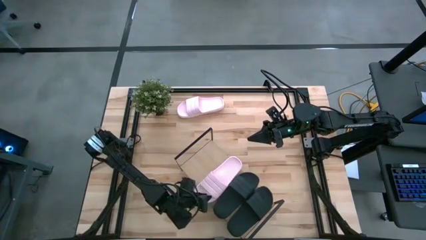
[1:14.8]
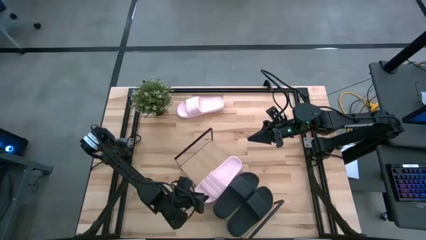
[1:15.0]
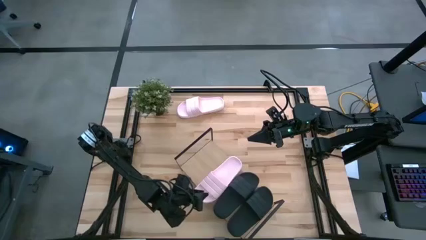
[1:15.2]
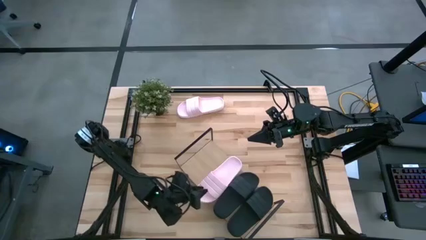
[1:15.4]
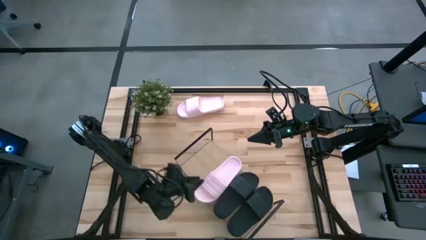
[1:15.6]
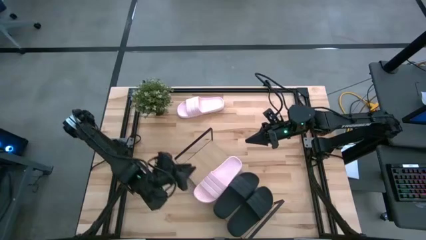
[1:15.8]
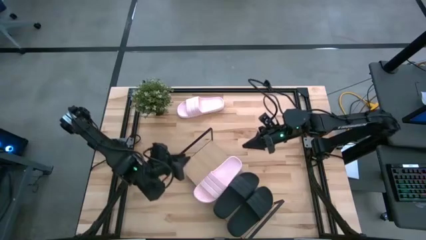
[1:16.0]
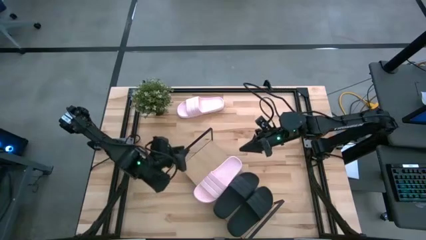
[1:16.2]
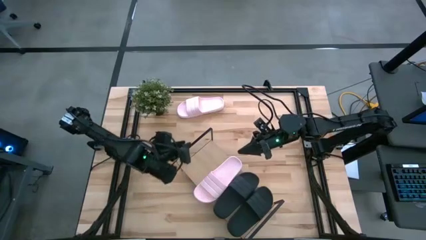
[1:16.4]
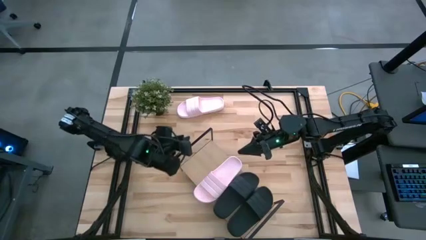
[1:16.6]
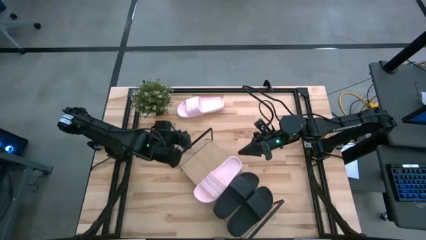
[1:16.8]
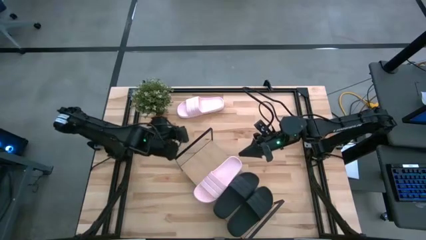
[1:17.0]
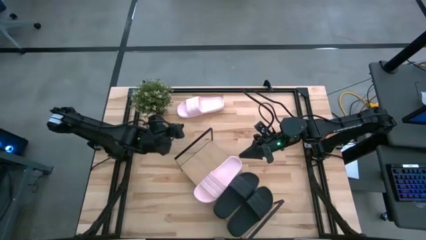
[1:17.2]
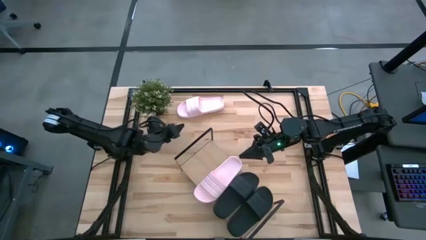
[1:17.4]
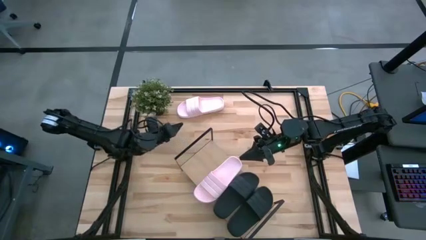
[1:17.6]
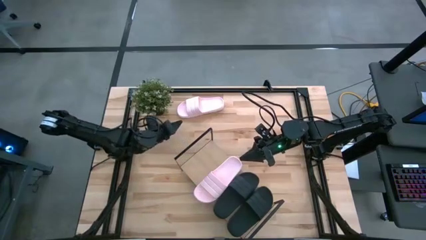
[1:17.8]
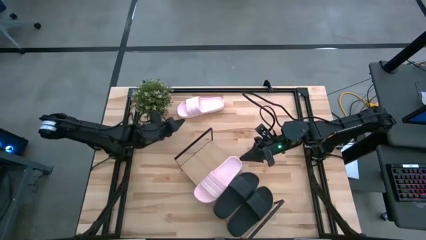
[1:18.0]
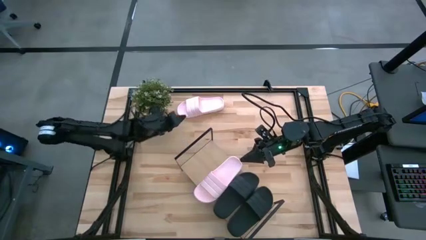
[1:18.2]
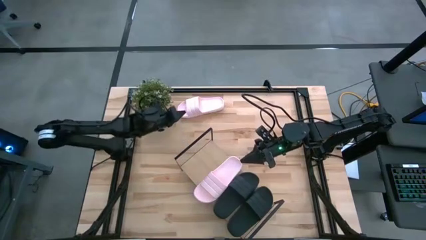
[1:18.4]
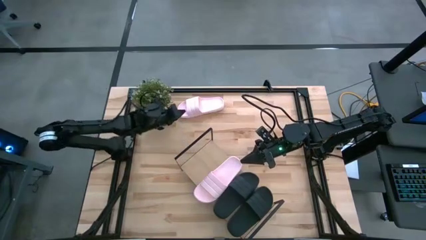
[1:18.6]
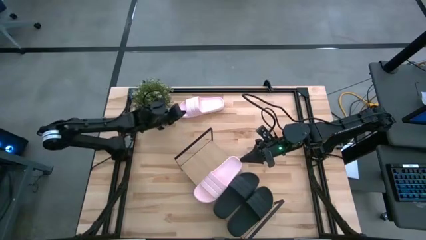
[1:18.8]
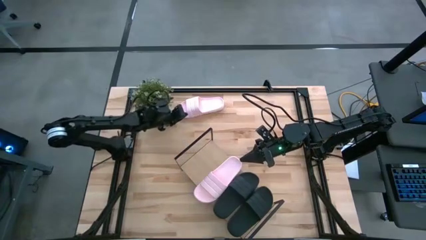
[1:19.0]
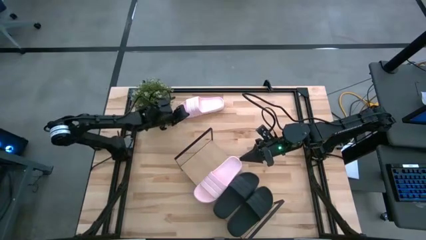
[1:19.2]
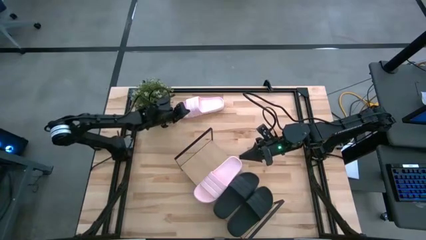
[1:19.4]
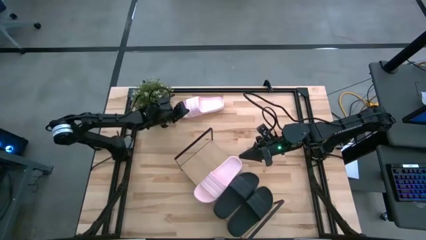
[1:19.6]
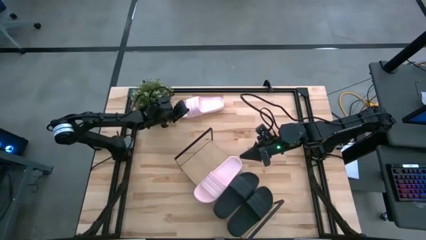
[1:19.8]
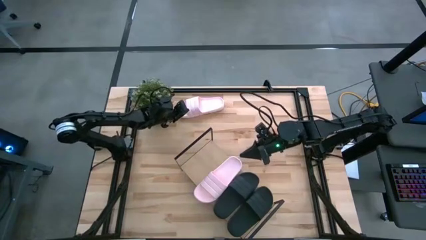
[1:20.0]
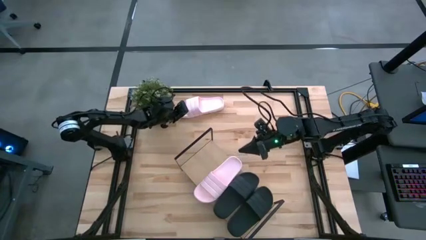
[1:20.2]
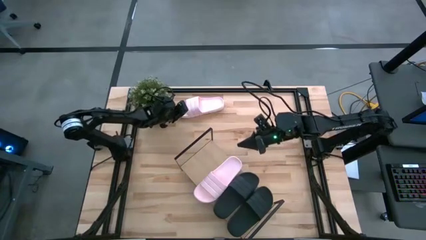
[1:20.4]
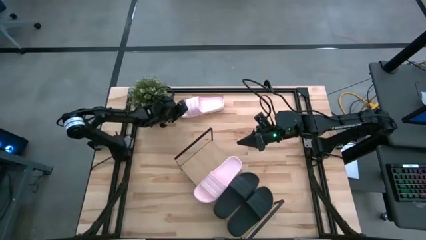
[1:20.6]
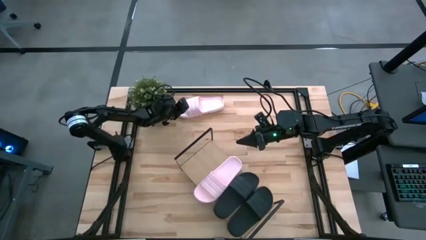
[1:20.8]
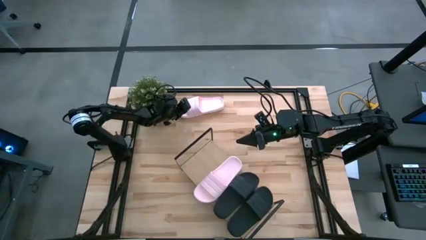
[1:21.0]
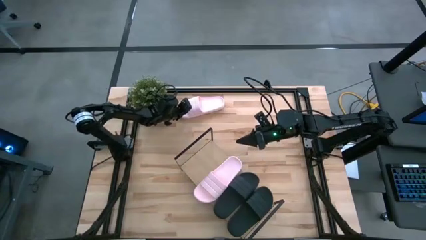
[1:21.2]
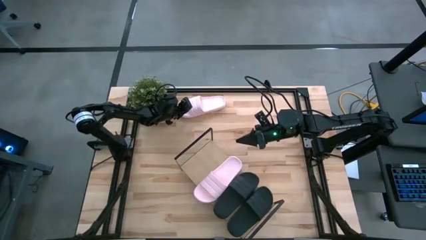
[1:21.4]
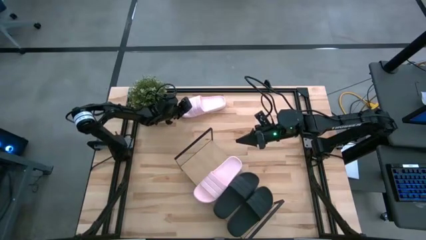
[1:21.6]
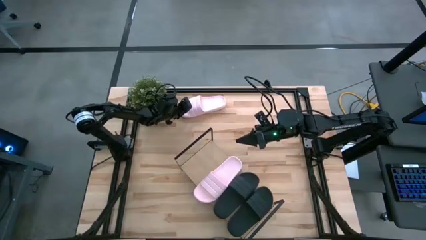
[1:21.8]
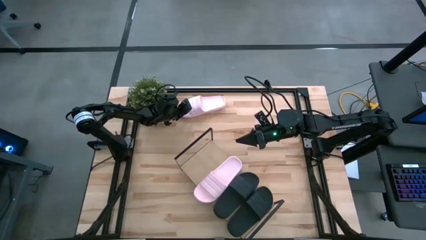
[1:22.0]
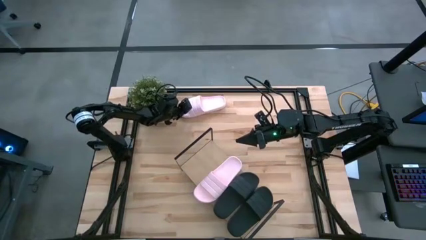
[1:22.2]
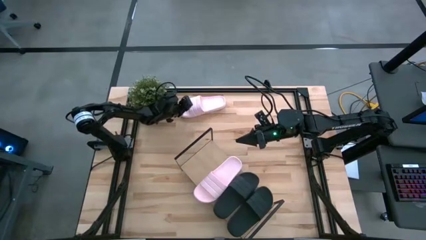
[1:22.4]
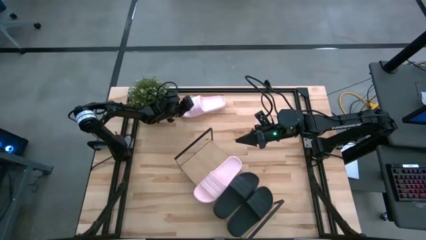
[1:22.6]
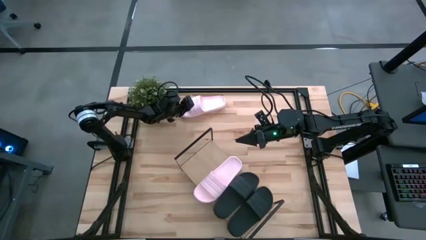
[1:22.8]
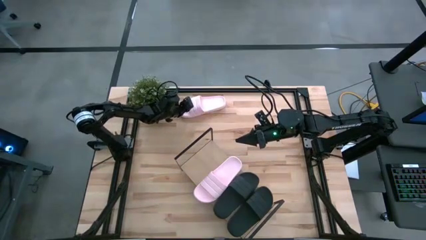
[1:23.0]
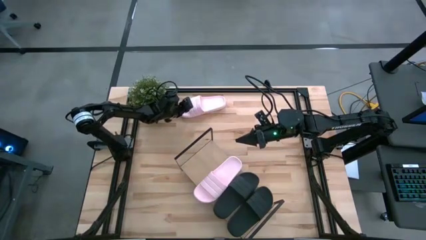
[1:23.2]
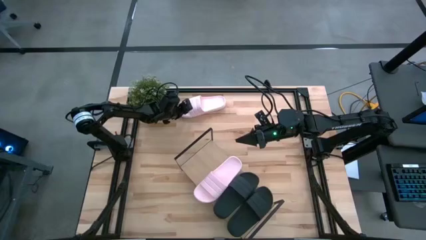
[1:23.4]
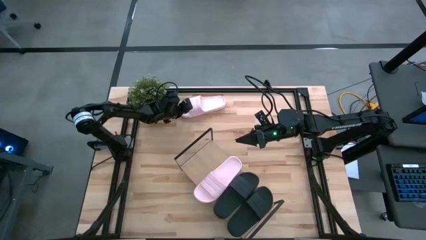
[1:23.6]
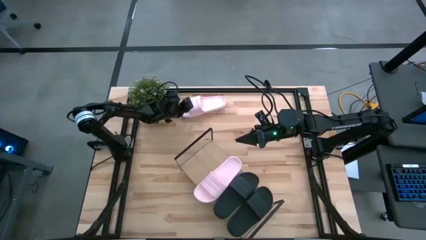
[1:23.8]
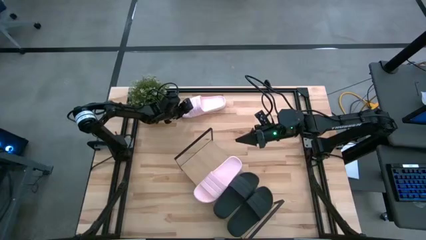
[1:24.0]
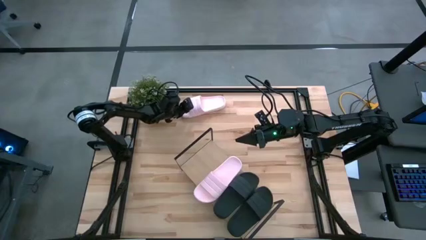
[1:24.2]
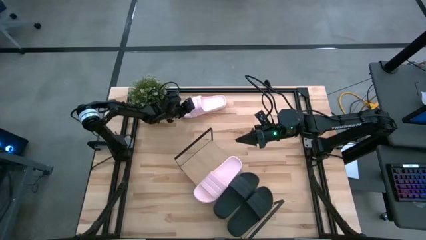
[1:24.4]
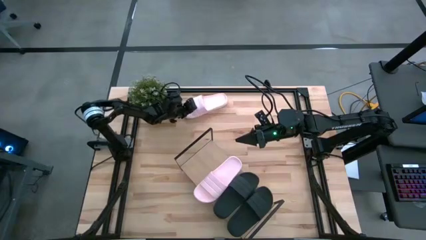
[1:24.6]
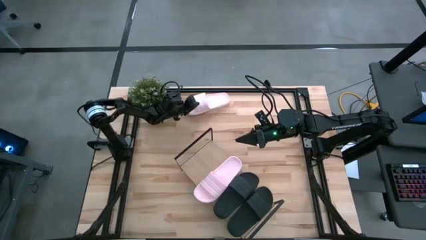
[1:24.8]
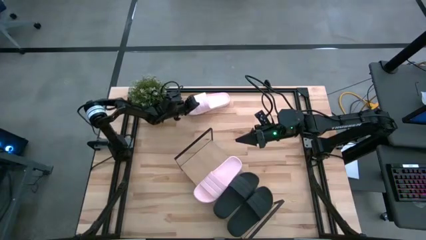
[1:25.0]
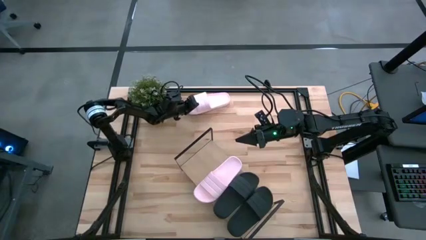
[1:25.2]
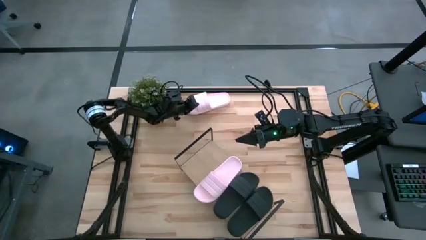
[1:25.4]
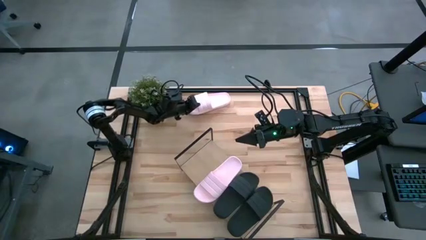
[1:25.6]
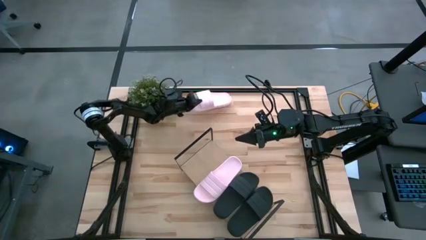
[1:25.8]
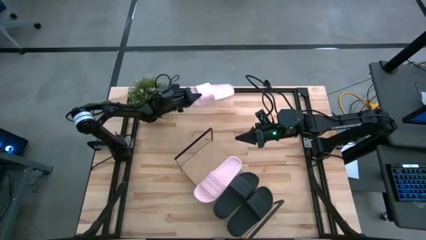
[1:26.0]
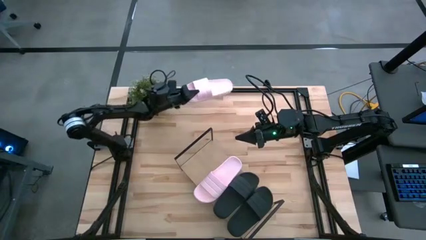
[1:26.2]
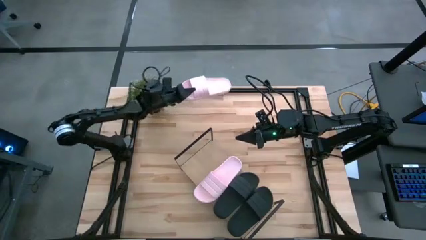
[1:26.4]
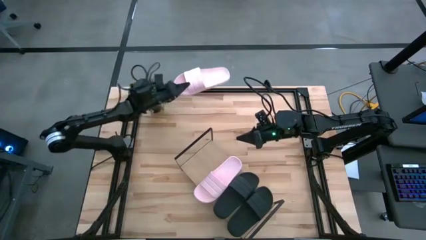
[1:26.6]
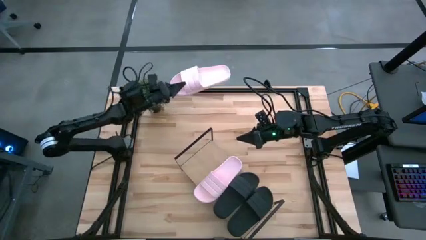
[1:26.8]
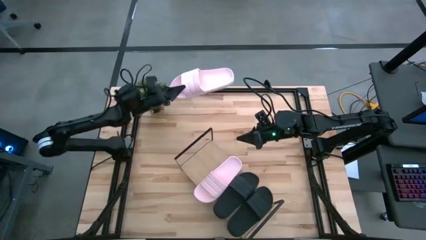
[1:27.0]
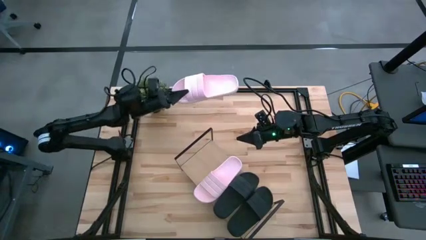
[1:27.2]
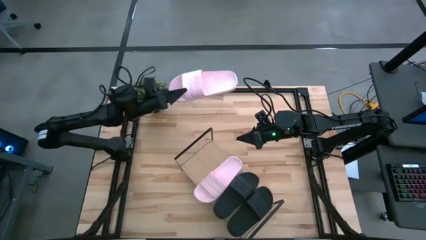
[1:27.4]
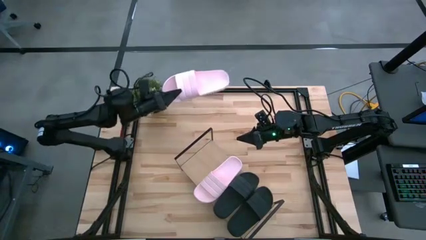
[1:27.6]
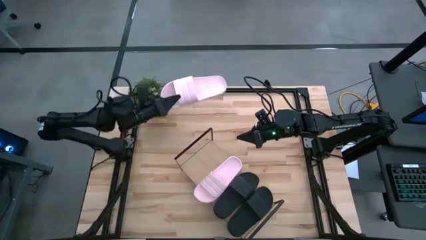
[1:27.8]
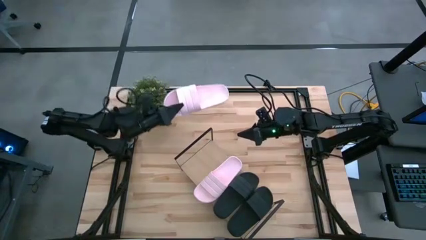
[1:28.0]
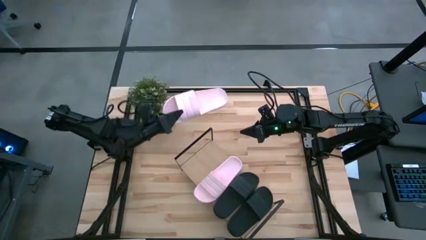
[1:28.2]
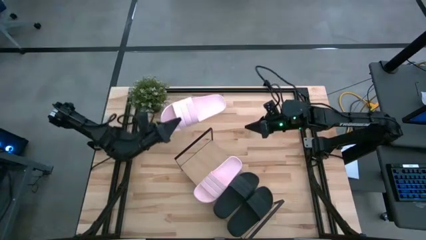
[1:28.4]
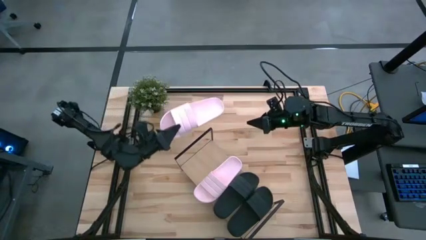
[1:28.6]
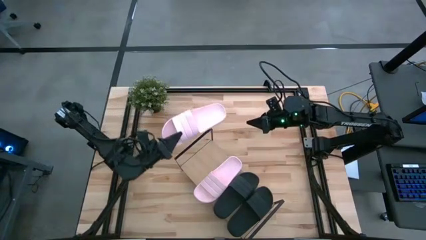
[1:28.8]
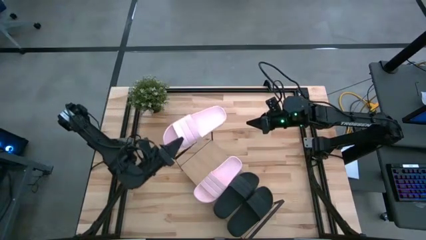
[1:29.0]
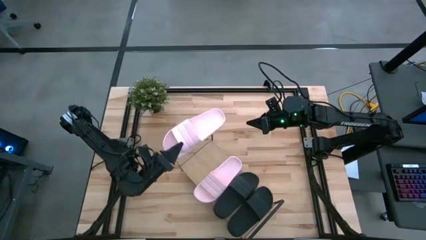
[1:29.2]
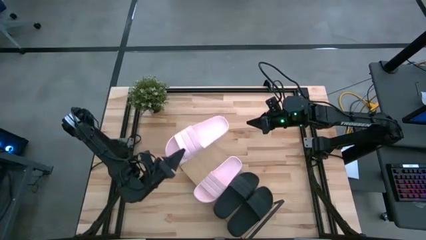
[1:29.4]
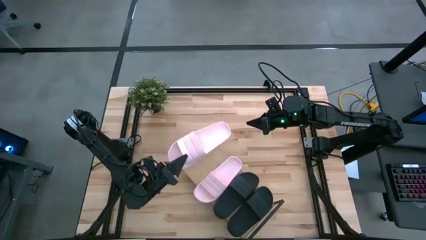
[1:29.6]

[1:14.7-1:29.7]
Task: Pick and place slides into the shelf
Put the pink slipper on the shelf beside the other pink slipper

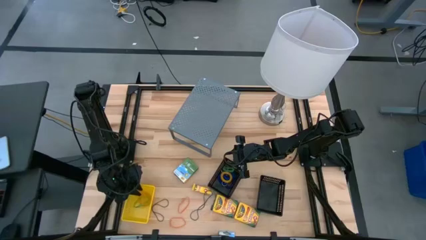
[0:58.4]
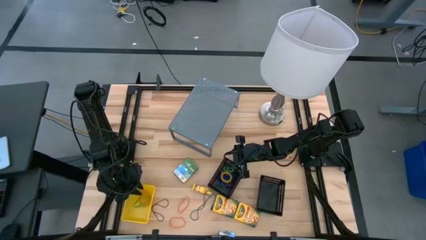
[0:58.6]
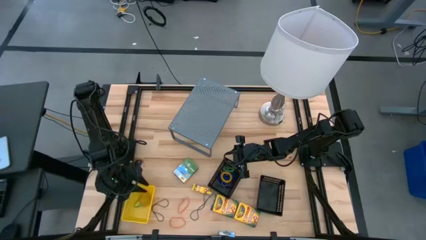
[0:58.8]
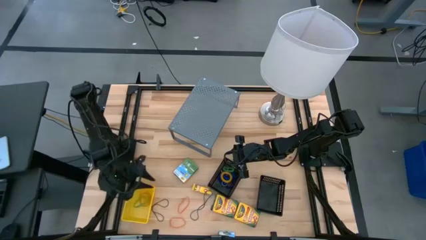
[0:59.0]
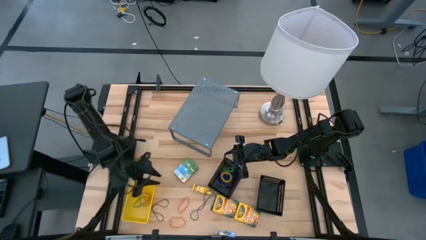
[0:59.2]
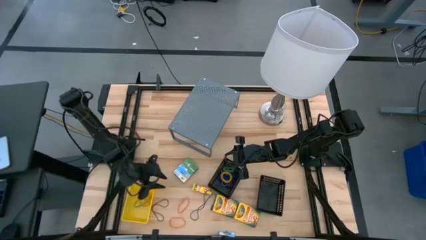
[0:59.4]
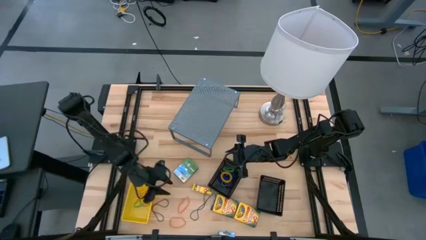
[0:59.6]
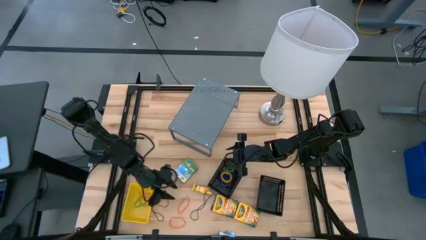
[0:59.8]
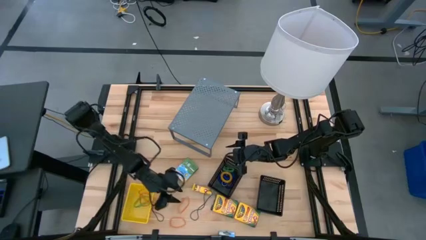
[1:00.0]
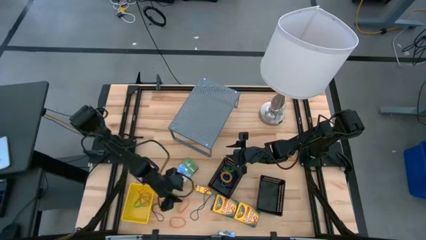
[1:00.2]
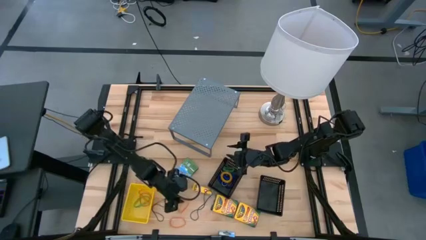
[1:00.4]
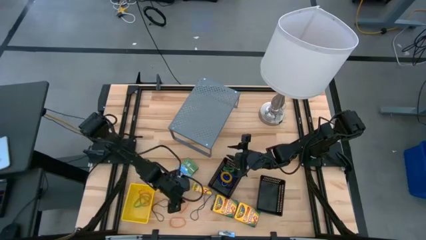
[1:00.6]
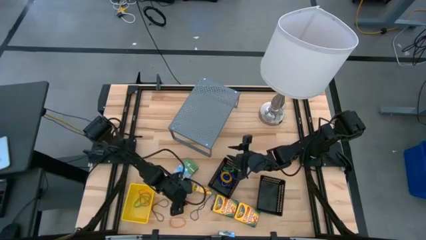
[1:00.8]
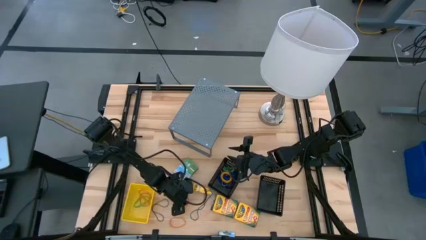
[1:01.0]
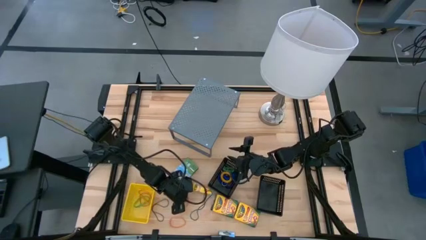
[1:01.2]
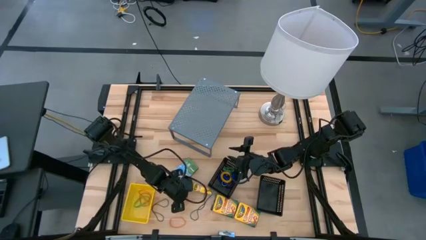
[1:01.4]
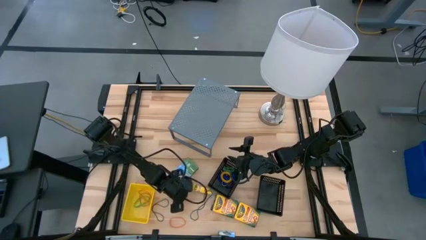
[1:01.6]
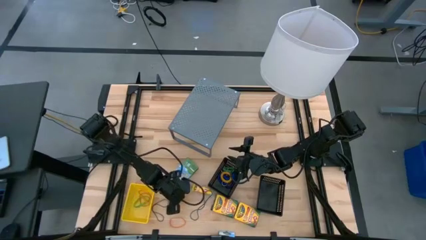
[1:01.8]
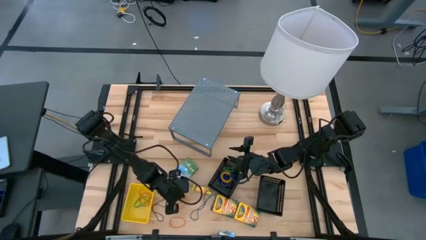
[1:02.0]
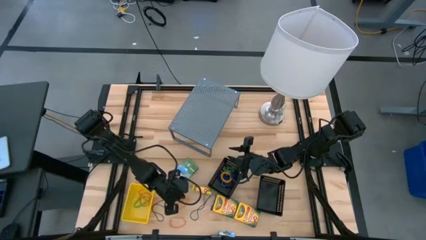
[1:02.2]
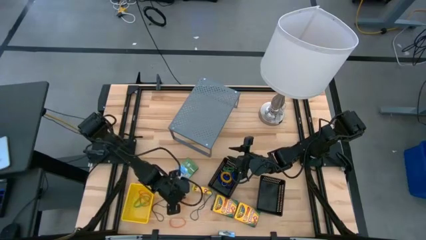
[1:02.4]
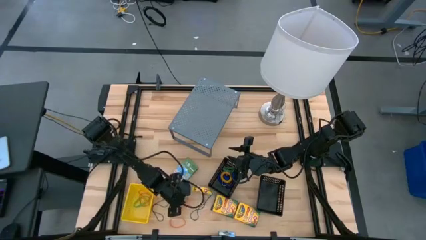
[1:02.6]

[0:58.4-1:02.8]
Task: Pick & Place Office Desk Supplies
Put the orange rubber band into the yellow bin
